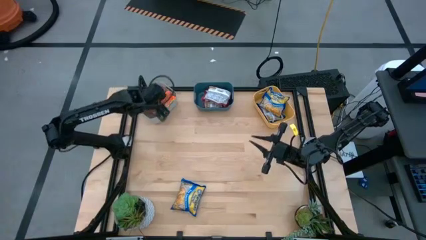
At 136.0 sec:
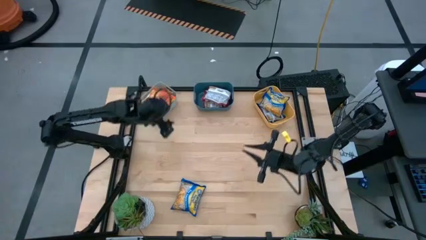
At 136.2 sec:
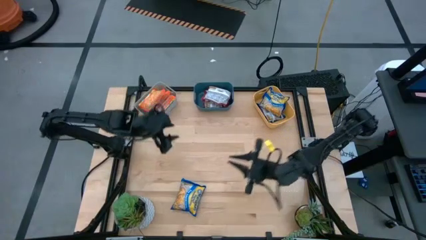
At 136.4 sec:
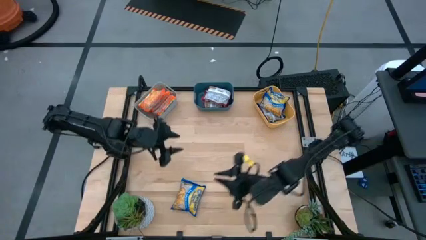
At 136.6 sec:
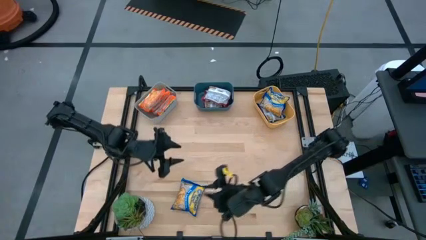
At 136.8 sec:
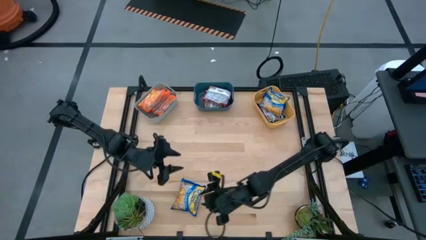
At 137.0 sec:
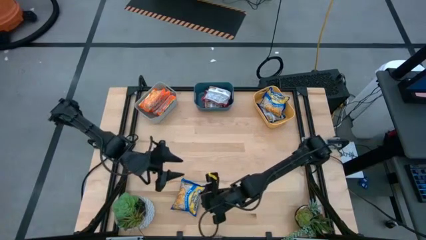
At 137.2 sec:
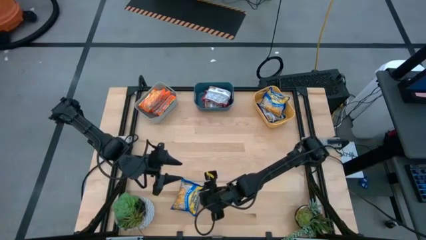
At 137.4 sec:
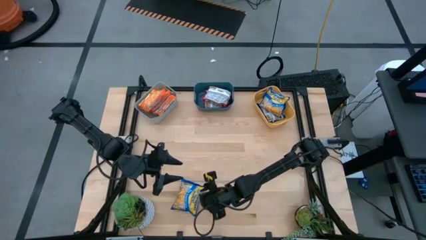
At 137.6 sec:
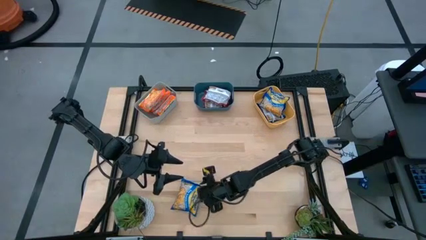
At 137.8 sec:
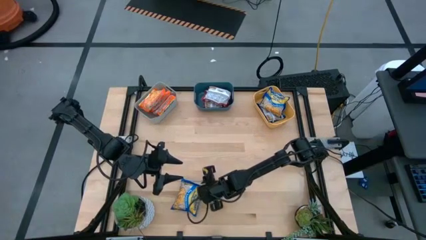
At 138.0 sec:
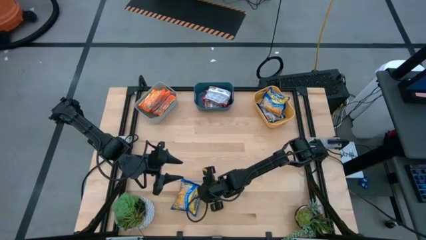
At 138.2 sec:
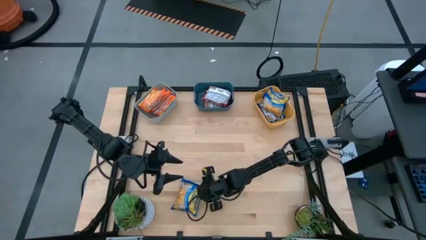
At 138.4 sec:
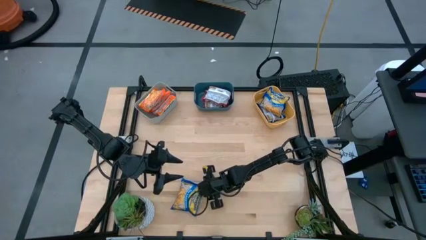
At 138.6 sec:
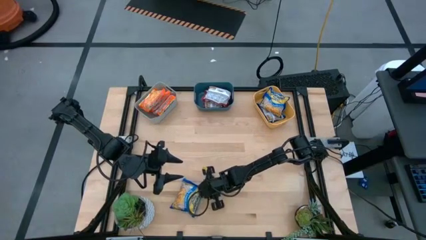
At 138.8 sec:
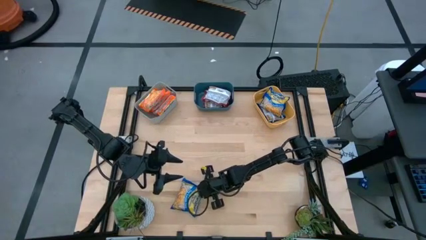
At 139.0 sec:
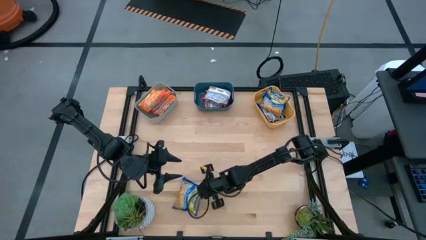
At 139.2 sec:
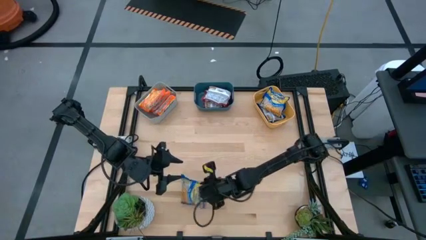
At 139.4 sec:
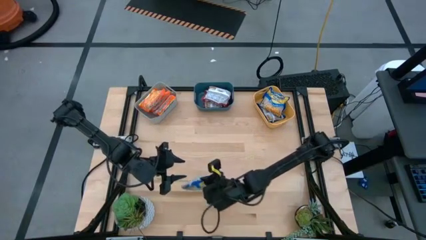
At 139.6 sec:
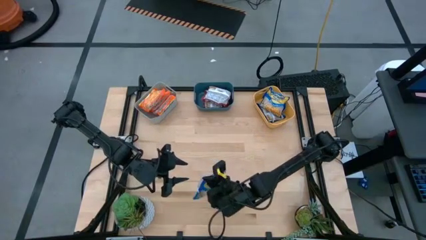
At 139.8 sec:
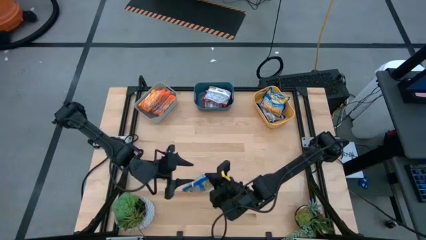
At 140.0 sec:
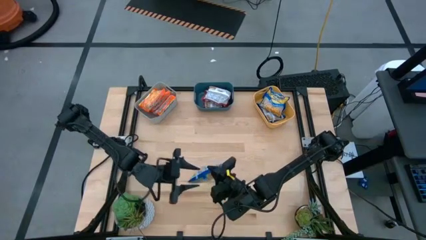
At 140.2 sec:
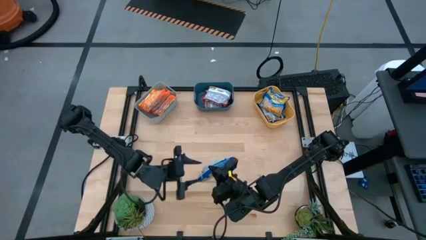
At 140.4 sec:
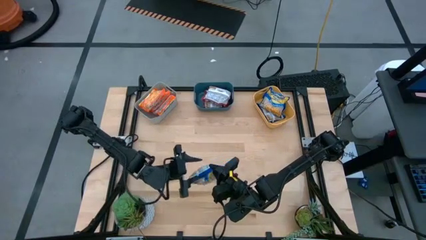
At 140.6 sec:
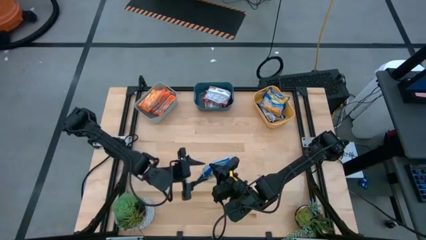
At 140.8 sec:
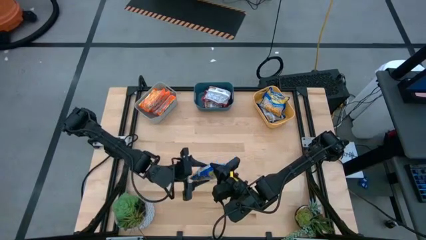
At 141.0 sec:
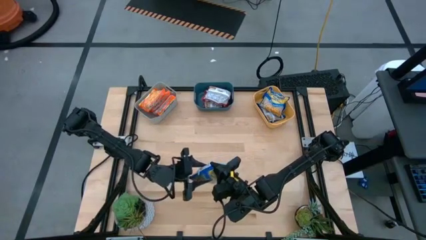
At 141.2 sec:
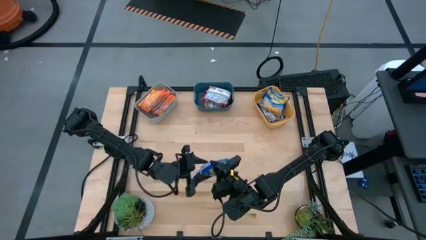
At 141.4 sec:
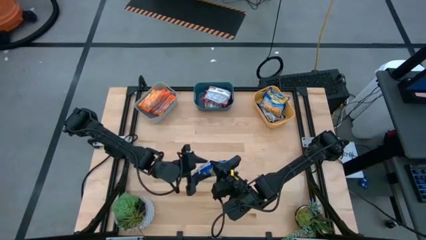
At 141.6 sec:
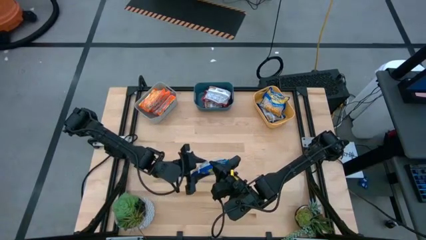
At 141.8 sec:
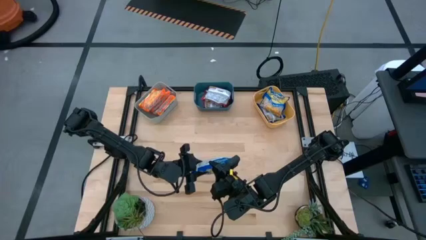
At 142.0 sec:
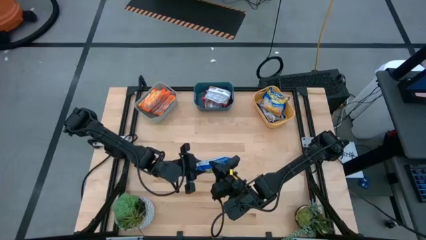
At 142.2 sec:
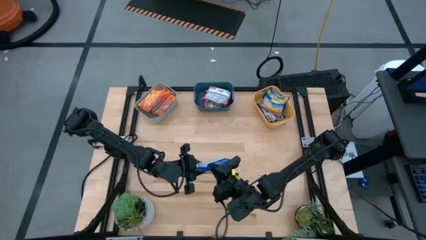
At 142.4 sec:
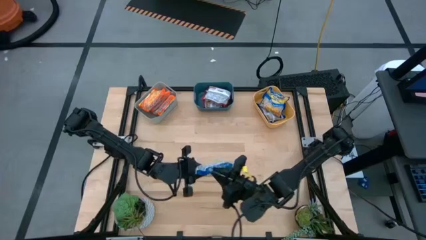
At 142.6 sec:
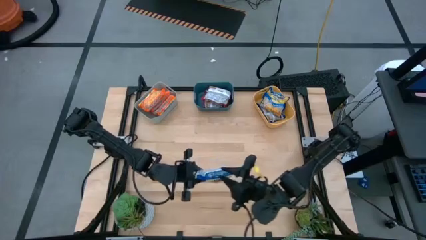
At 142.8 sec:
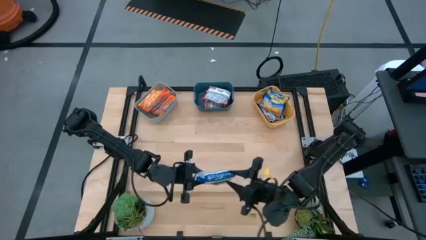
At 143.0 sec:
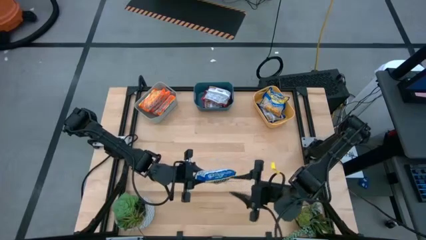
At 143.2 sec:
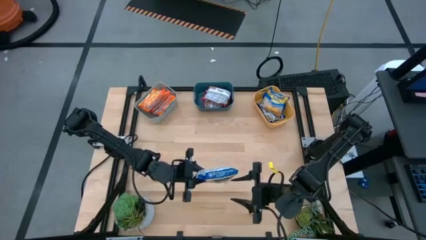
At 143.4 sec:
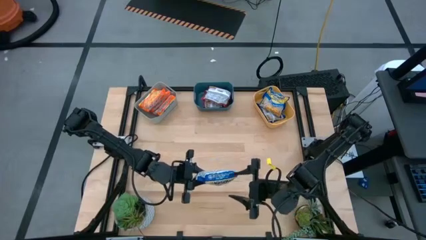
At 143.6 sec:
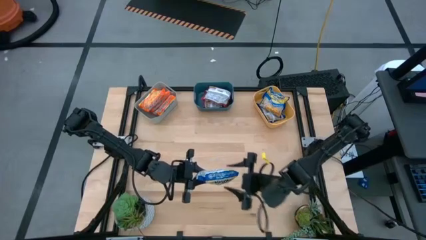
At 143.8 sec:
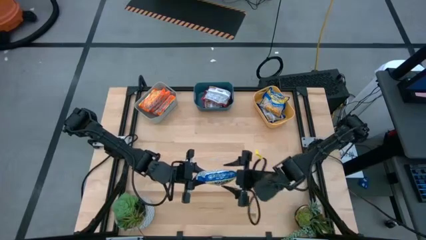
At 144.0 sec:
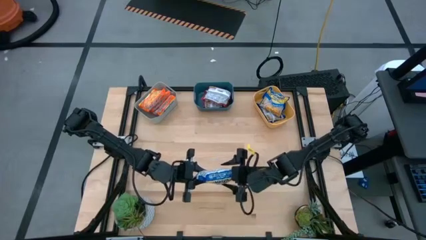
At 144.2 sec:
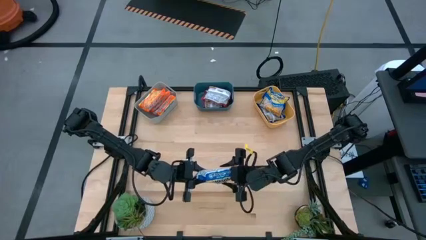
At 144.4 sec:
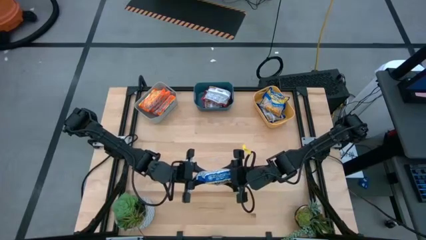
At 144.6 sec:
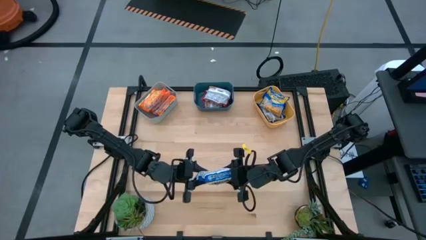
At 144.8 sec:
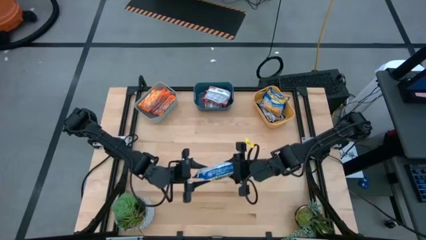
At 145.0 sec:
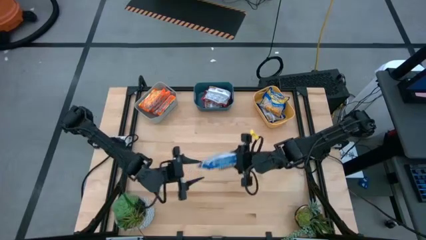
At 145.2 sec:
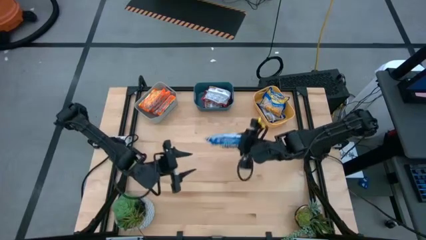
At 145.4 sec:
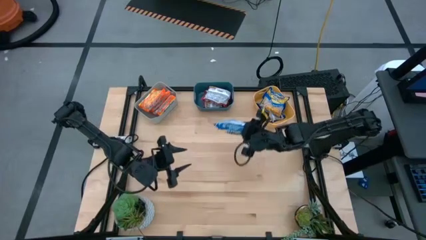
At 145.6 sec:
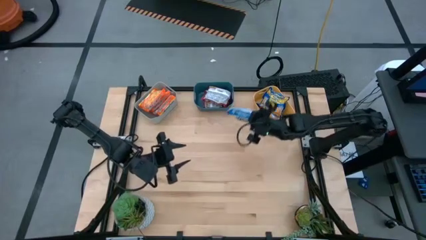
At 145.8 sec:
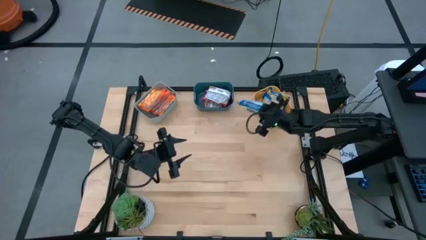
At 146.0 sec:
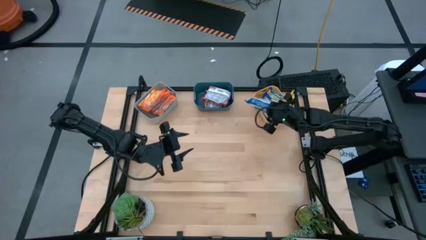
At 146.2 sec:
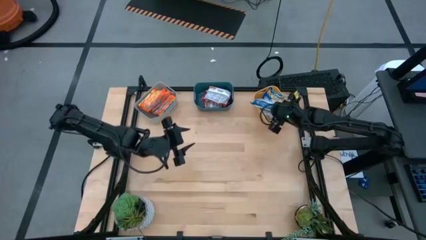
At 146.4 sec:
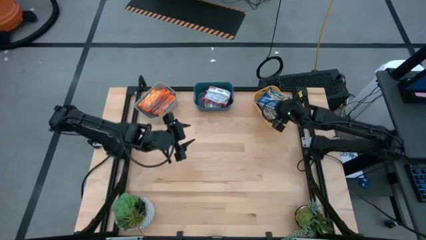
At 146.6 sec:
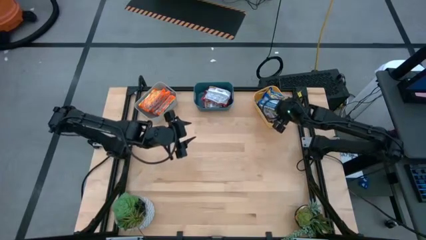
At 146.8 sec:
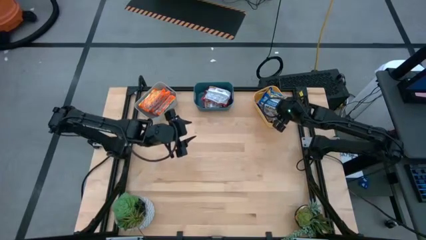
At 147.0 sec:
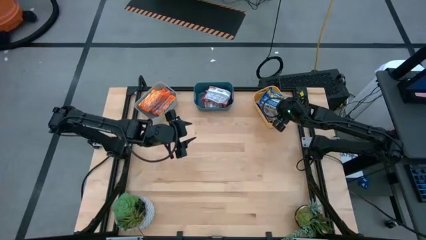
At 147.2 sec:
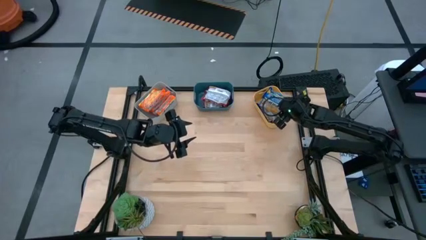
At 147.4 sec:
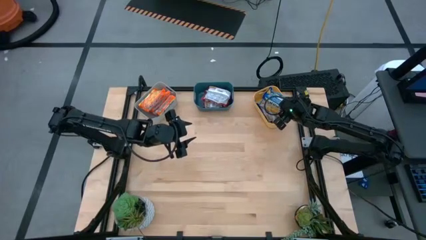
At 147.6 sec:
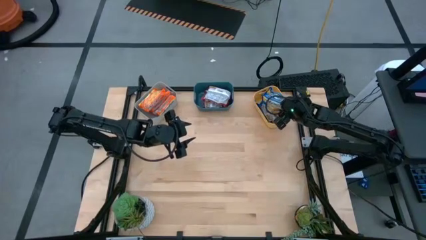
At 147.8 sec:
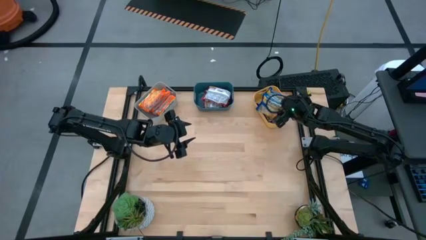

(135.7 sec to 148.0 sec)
Task: Sort Maruchan noodles
Put the blue noodle pack into the yellow bin

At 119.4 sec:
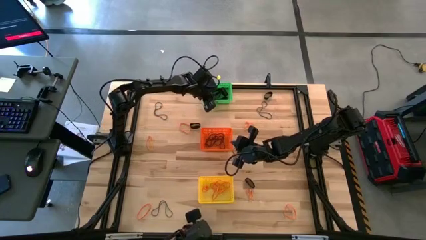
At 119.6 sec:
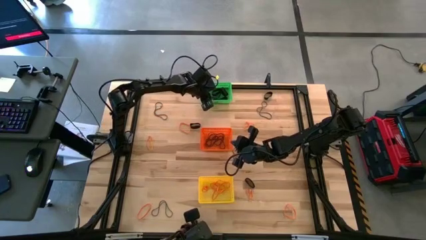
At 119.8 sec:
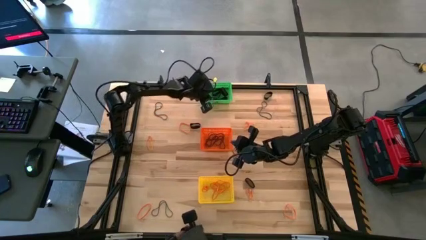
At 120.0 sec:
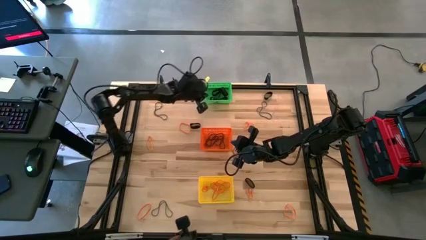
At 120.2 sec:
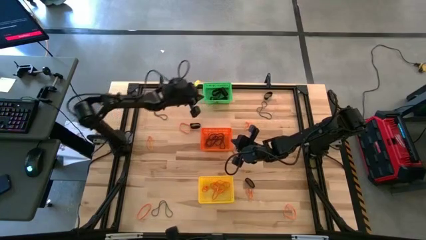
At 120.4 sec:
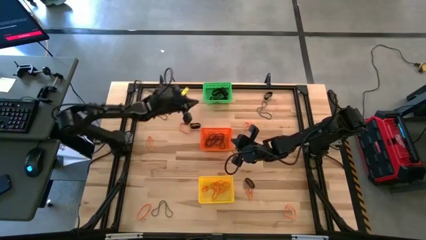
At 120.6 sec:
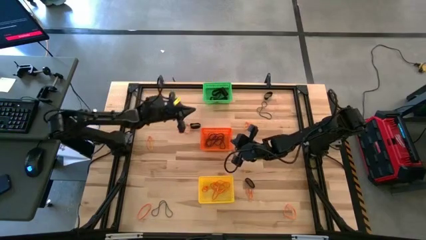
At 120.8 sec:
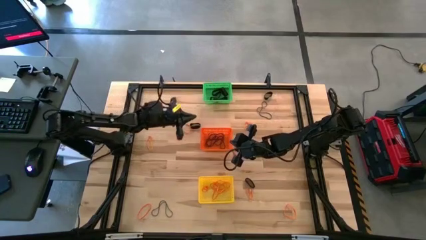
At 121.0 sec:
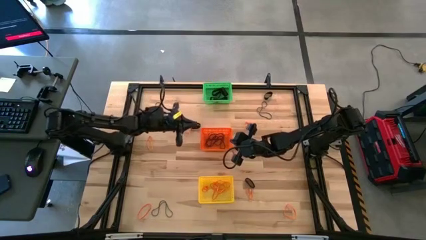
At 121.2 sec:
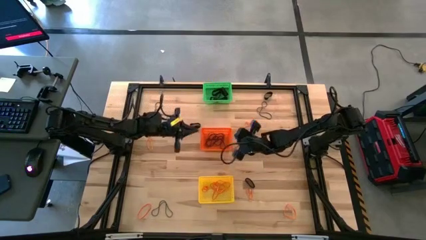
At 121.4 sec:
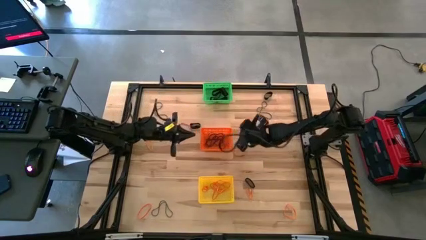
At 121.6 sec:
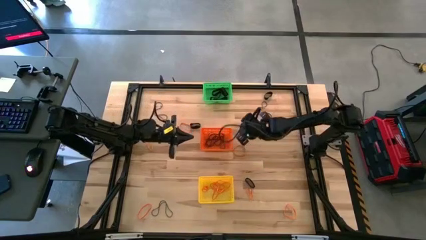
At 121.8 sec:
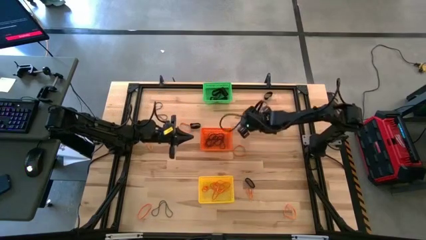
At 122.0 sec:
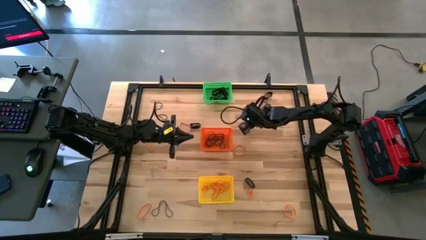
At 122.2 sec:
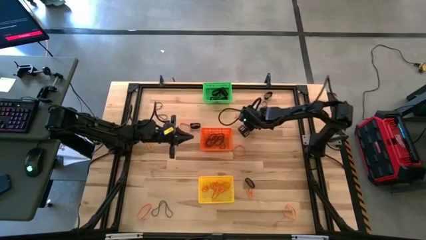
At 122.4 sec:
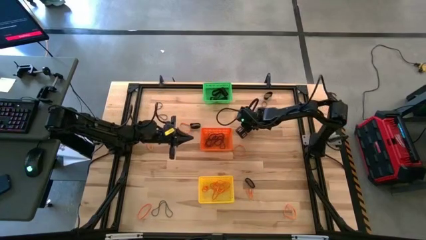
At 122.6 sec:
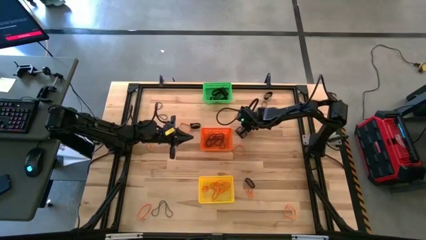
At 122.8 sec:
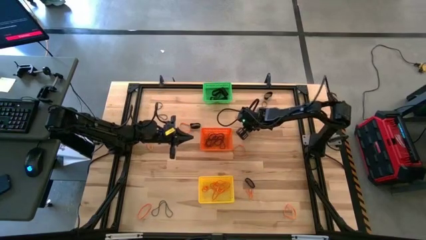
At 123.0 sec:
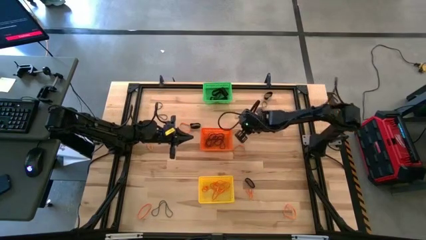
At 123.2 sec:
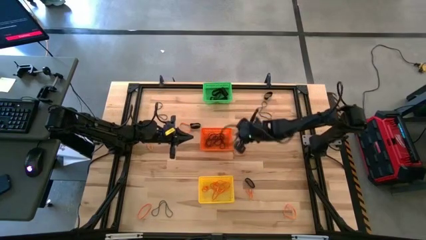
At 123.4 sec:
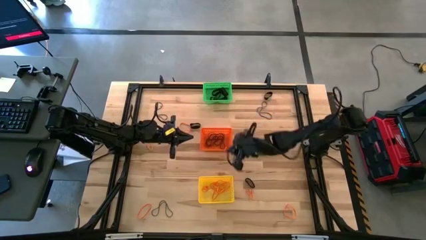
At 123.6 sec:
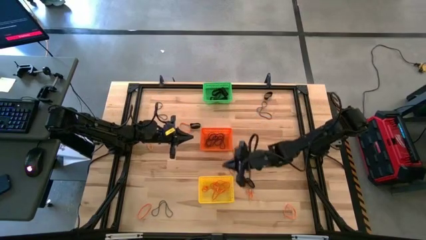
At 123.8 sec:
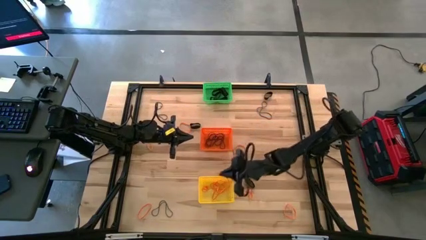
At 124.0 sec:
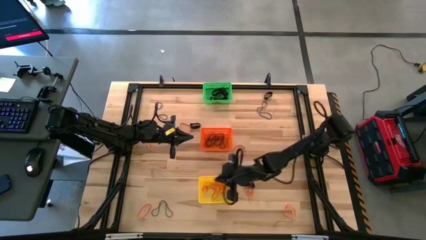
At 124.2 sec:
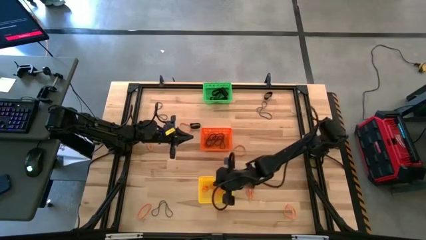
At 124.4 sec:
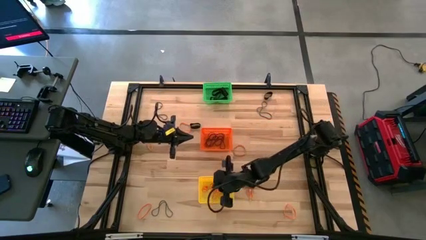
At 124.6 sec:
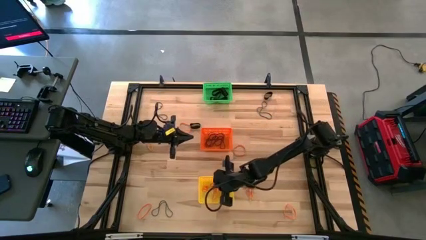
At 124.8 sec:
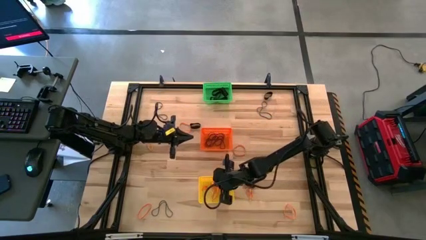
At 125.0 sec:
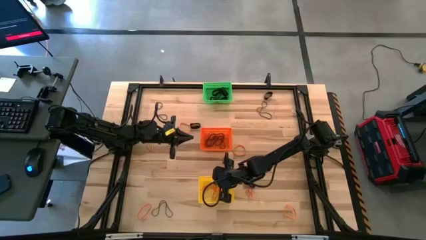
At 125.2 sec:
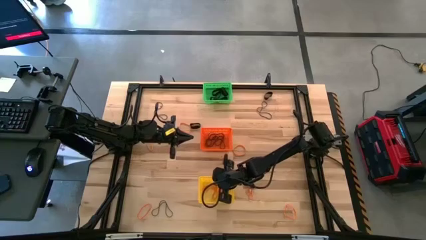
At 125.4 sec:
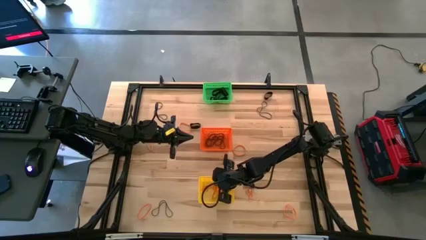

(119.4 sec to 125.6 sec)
Task: Sort rubber bands into baskets
Put the orange rubber band into the yellow bin
